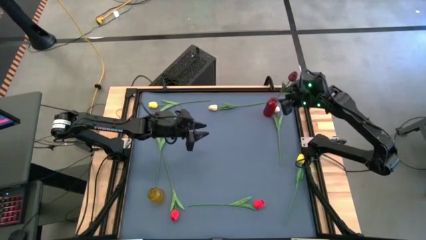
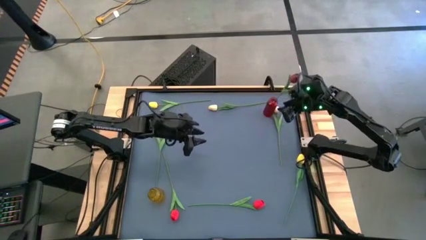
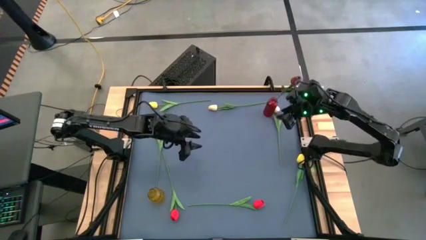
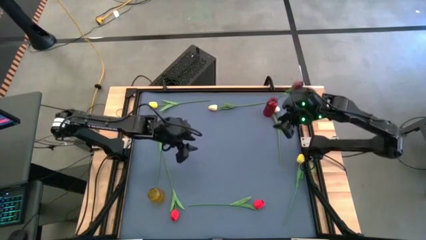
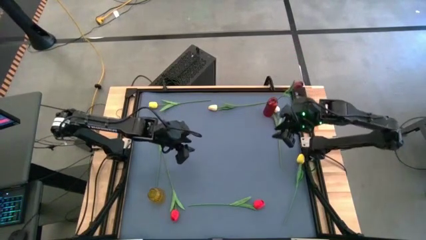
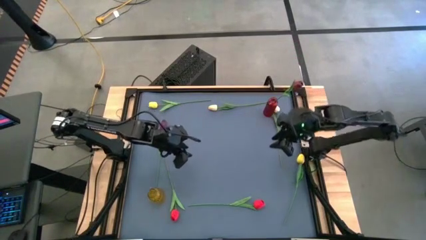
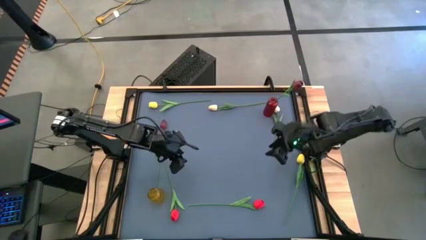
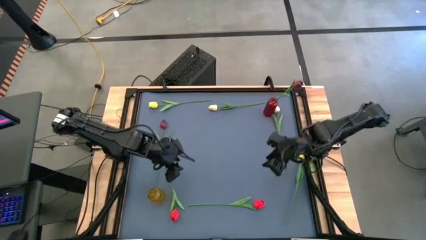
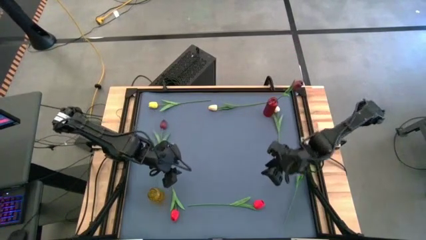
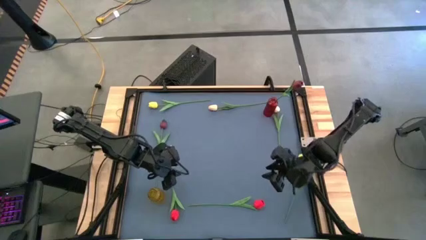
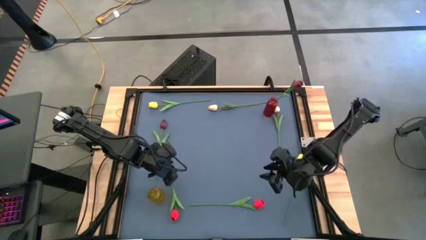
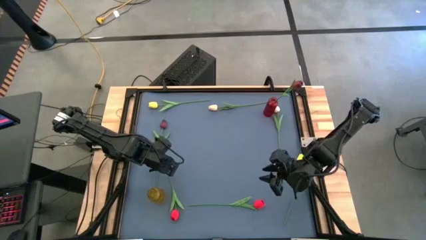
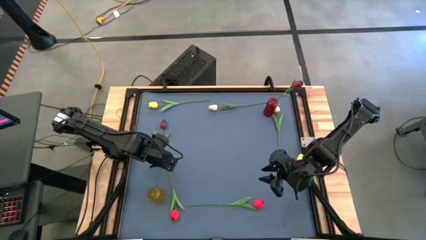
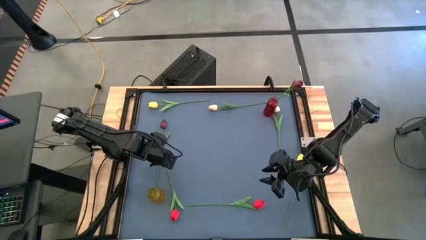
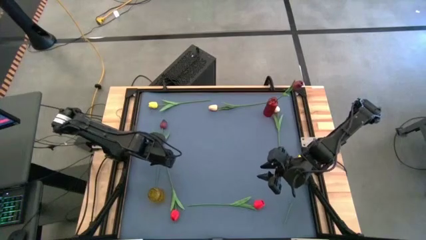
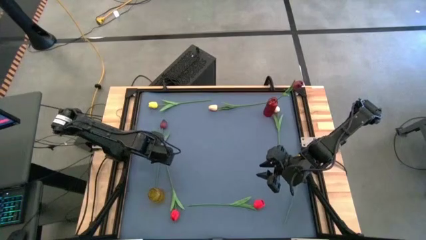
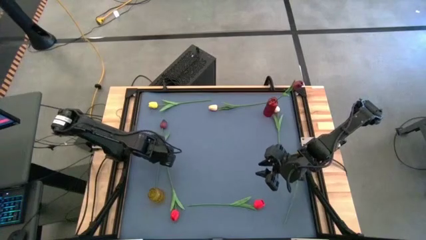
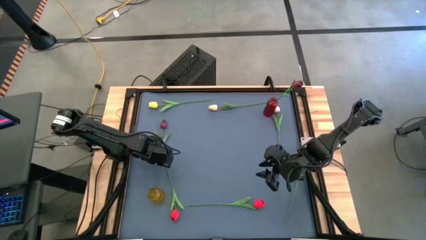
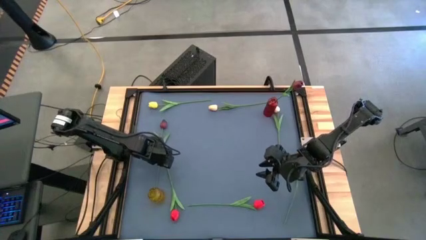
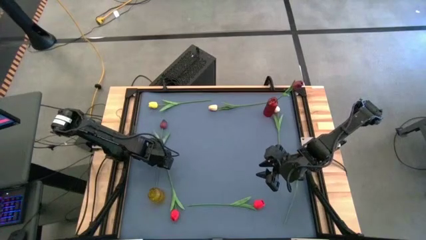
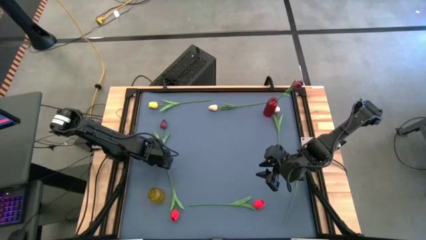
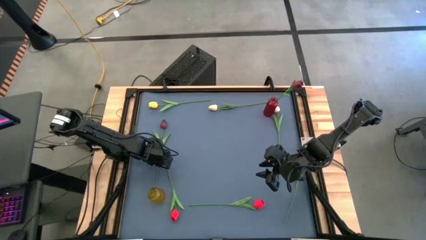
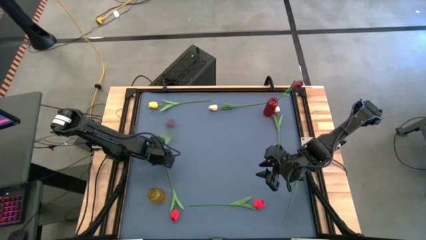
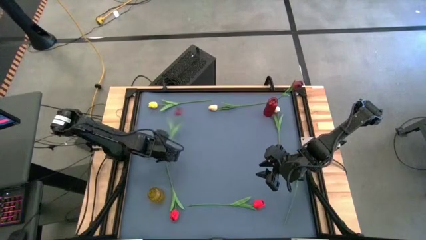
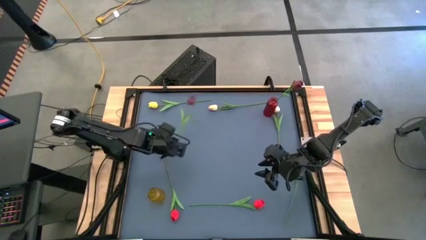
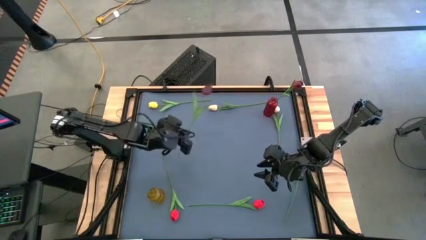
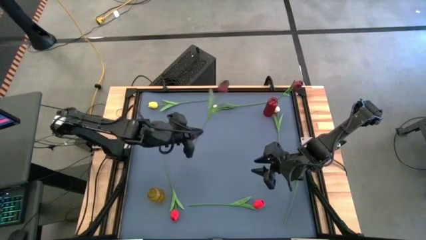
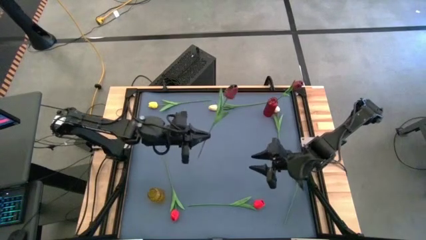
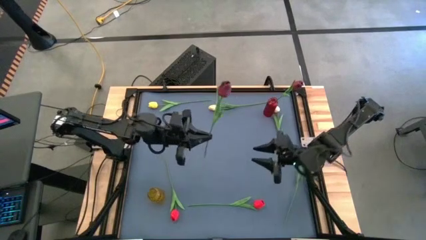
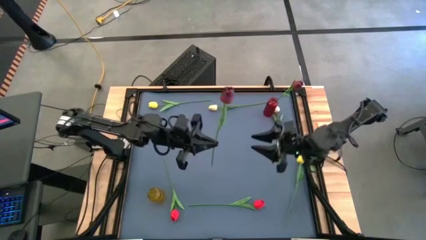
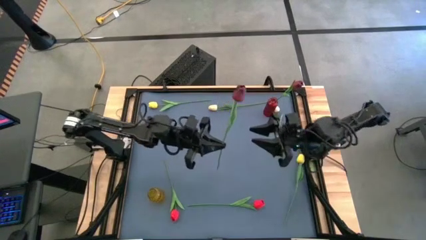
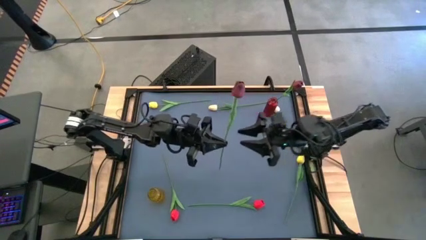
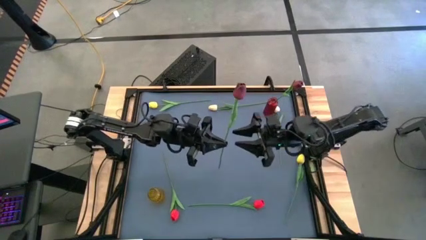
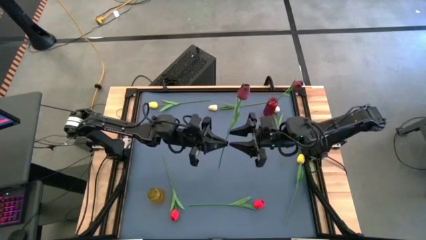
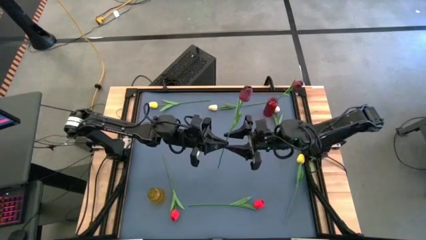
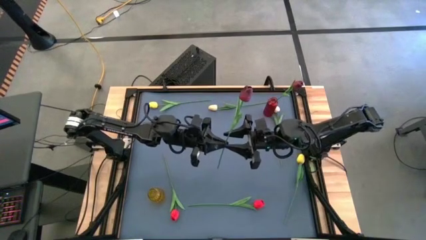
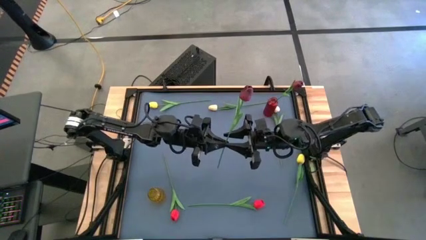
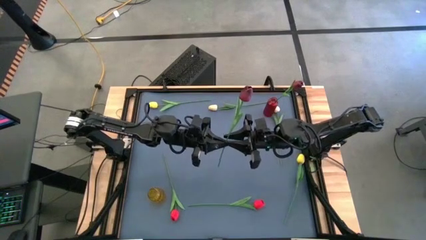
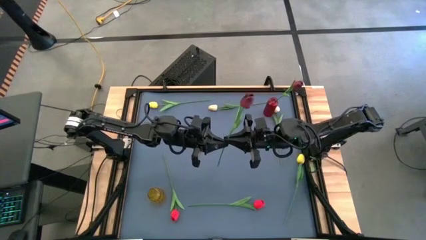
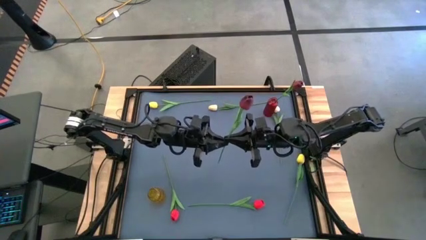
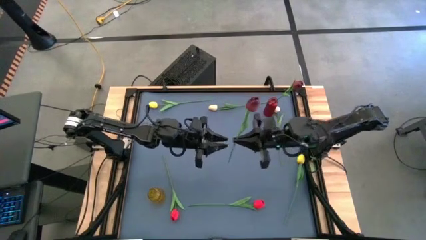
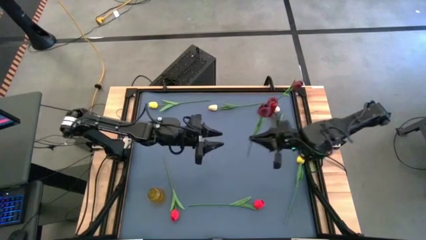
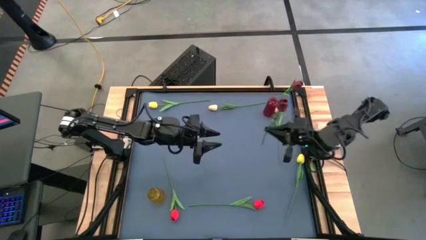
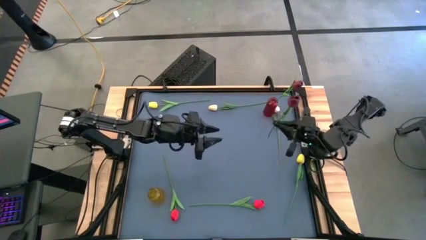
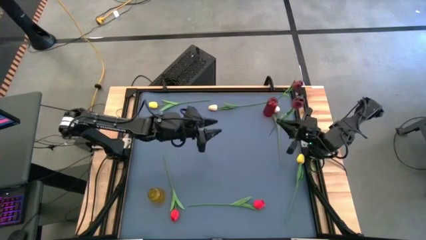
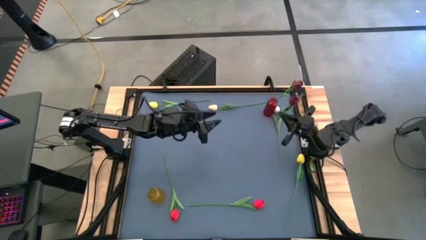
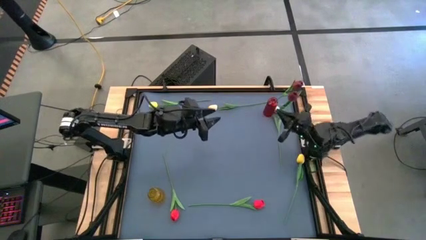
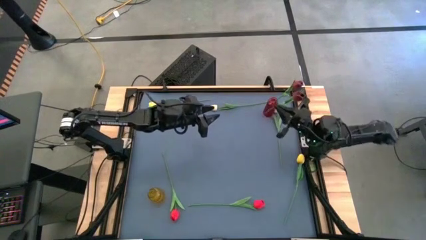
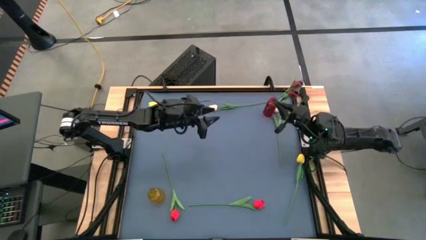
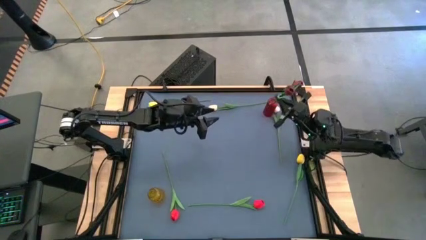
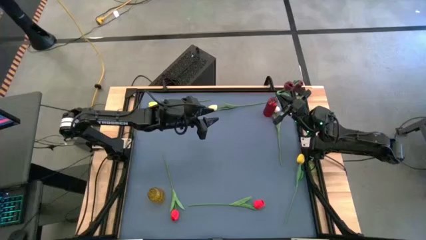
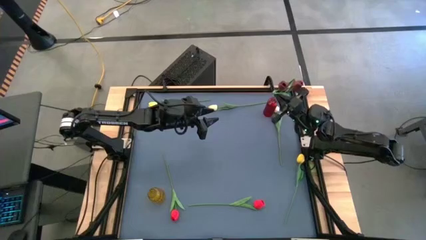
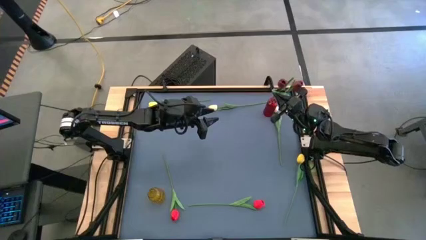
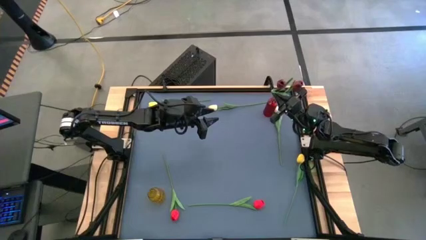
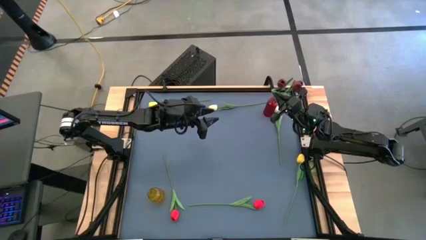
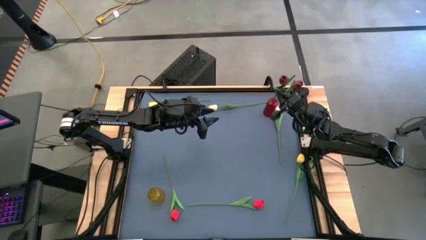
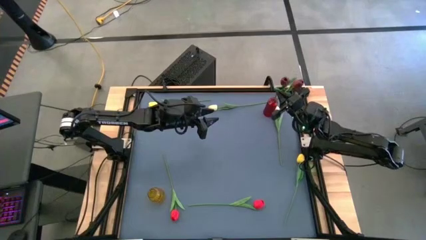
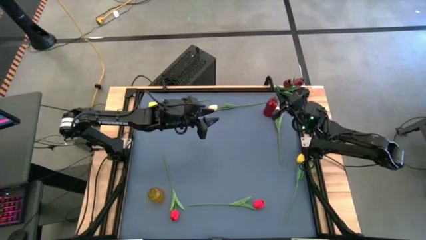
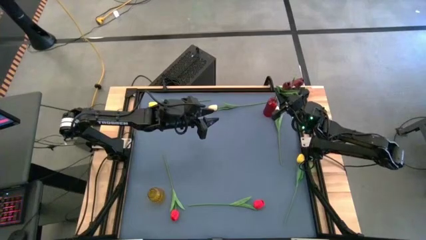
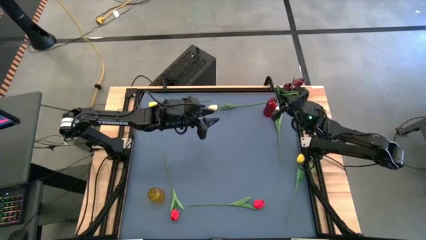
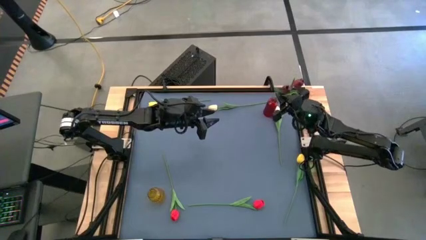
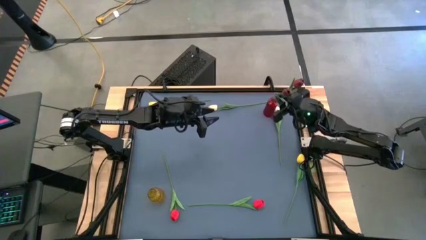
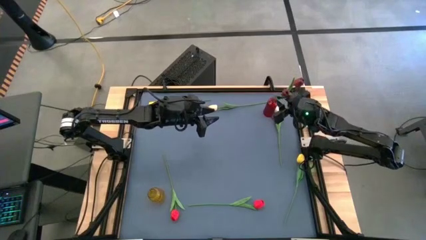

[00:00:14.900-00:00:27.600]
Task: Sort flowers into vase by color
Put the dark red flower into the red vase
